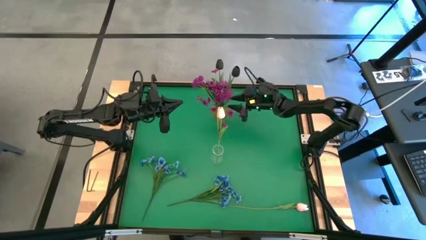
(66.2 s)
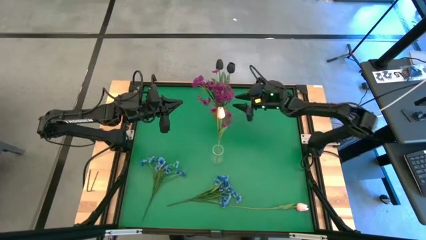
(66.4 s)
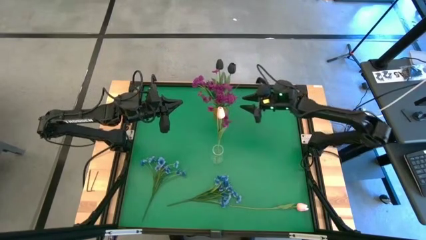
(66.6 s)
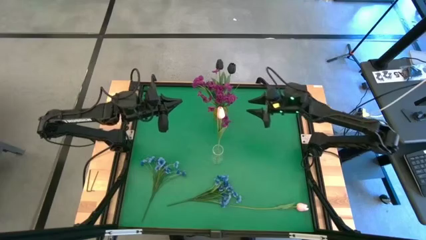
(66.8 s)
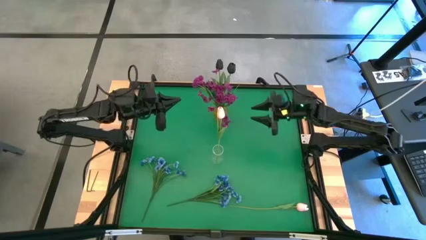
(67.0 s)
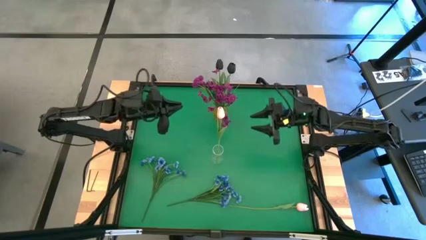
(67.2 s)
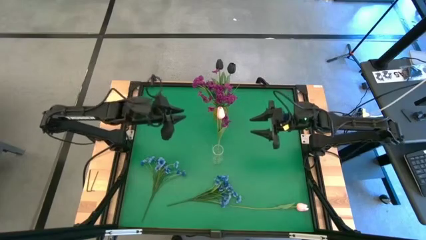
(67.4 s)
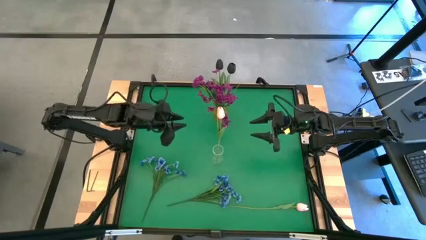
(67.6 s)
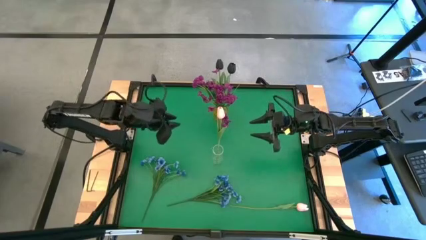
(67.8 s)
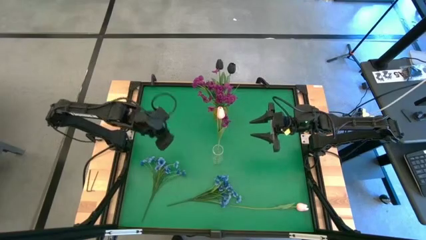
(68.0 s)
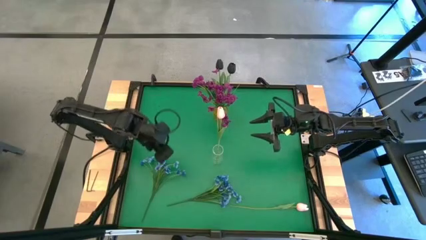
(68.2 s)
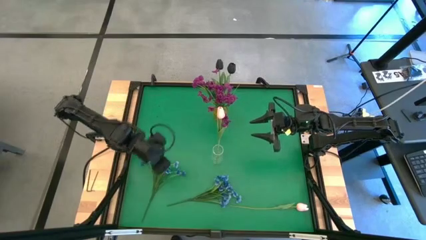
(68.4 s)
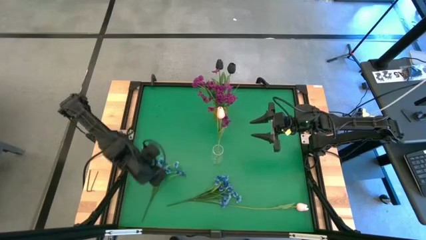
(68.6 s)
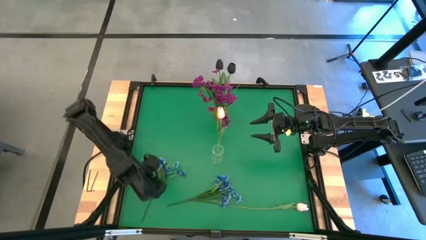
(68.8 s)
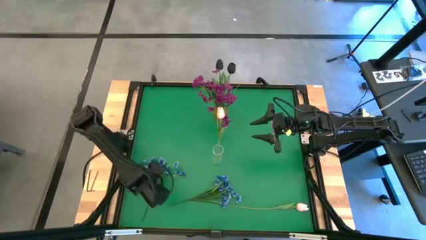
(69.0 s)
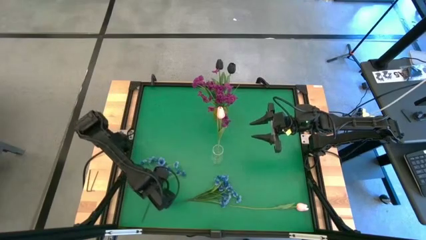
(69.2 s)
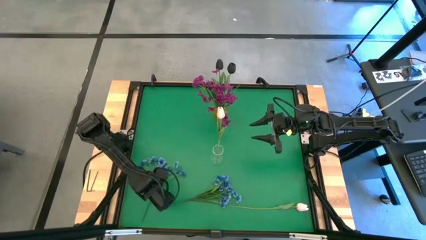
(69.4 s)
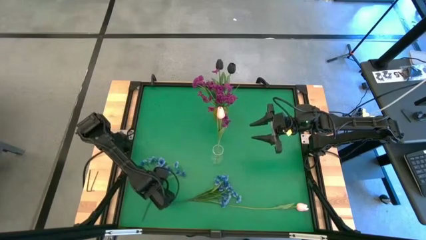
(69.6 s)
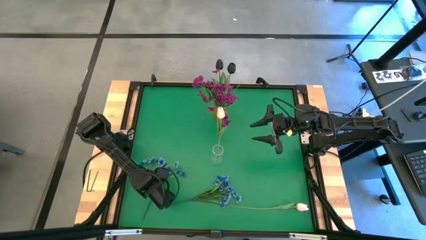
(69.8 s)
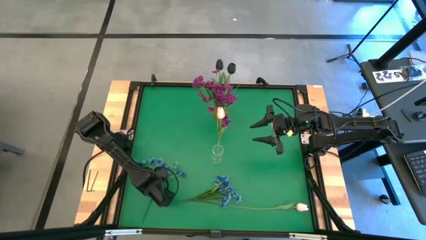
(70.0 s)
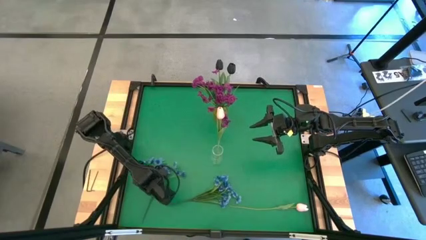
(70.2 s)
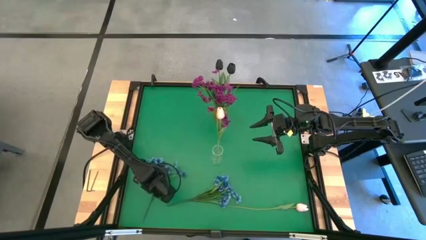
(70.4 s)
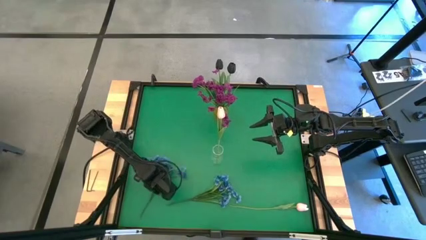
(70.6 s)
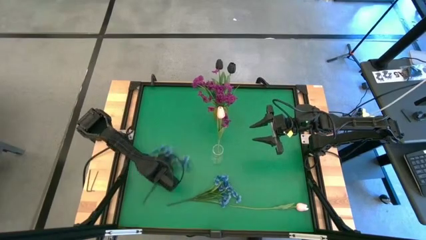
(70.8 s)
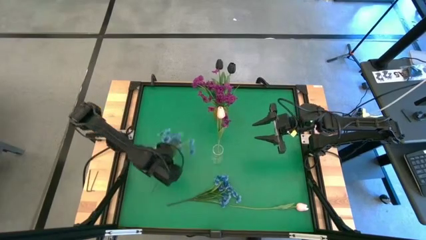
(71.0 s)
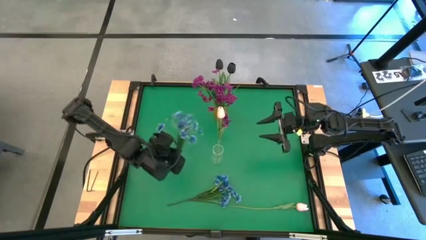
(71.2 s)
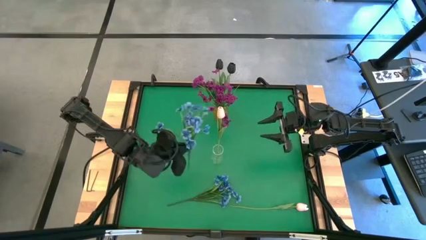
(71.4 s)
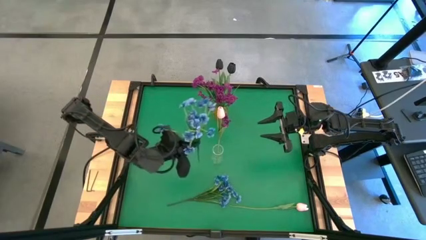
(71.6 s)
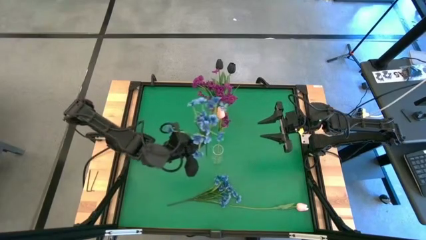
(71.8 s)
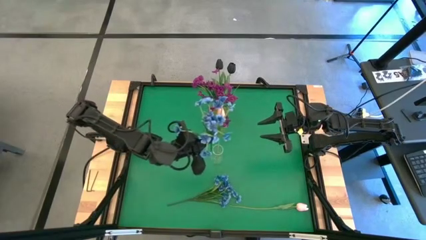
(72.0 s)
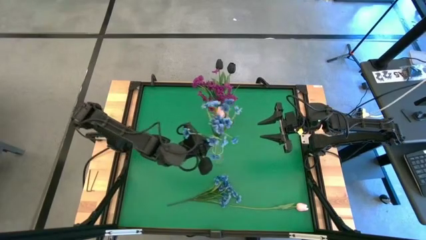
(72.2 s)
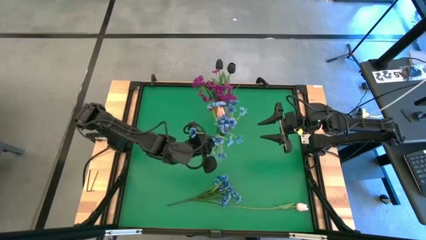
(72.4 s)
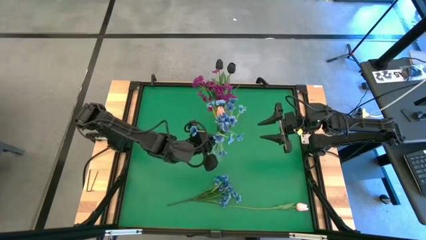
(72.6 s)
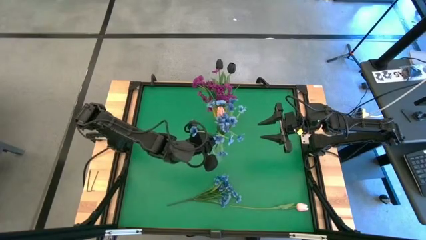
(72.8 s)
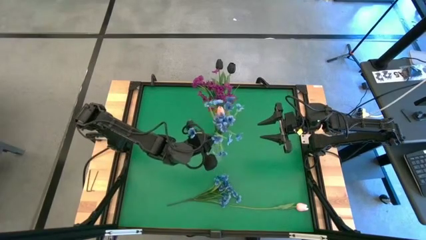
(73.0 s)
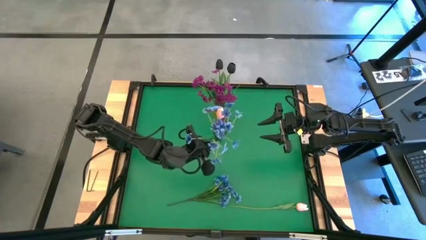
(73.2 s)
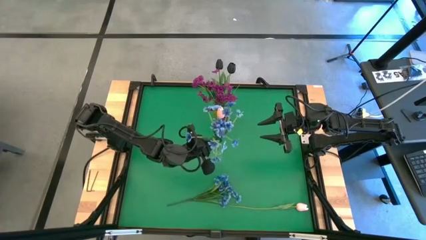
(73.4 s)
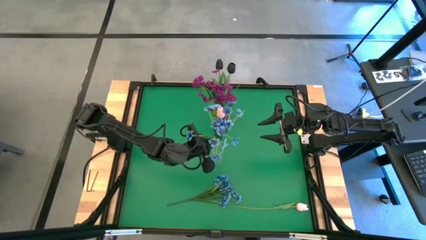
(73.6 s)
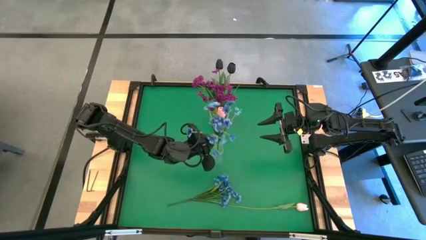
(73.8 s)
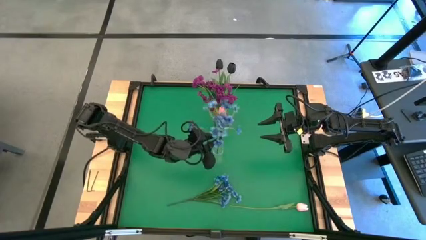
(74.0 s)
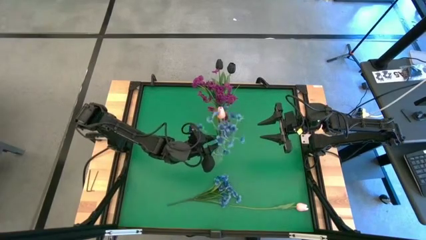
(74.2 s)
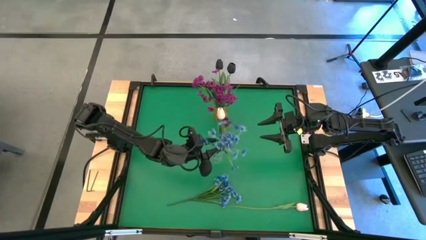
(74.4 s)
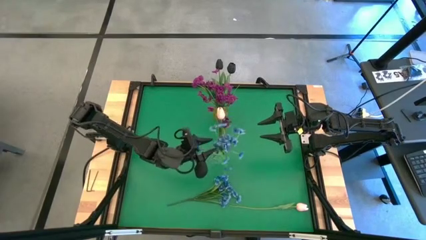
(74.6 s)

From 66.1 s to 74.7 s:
Task: Sort flowers into vase by color
Put the left blue flowers into the transparent vase

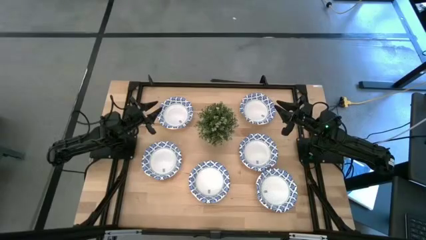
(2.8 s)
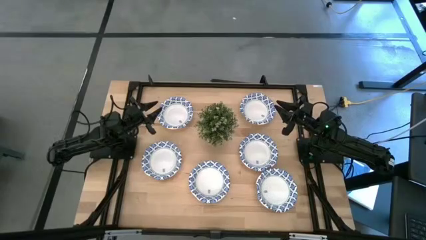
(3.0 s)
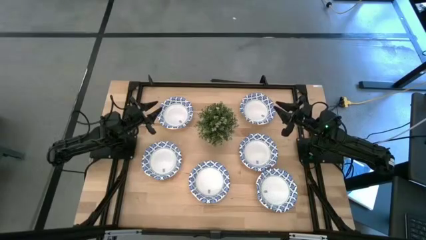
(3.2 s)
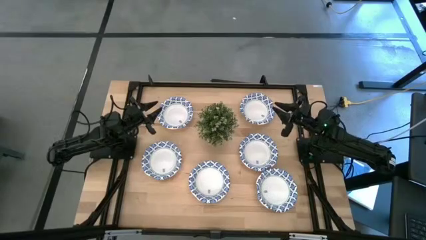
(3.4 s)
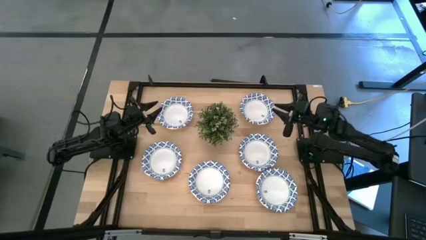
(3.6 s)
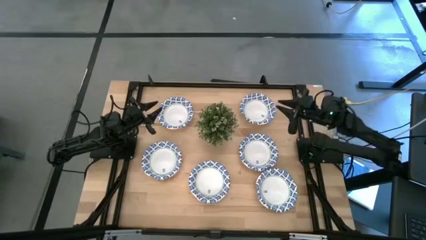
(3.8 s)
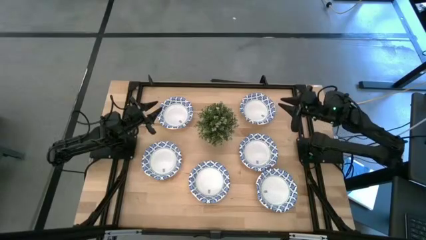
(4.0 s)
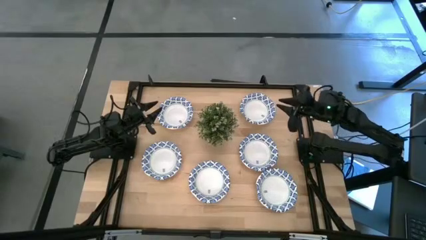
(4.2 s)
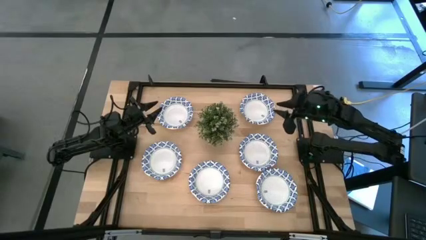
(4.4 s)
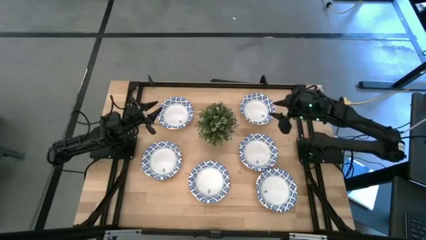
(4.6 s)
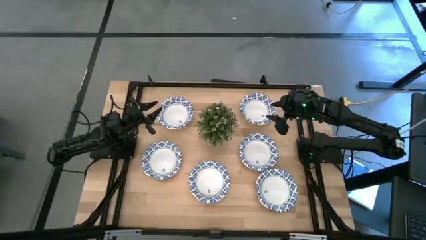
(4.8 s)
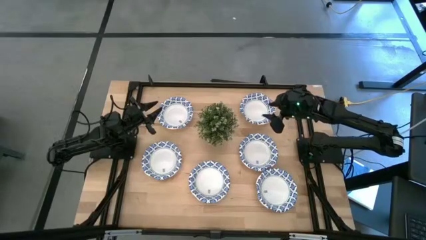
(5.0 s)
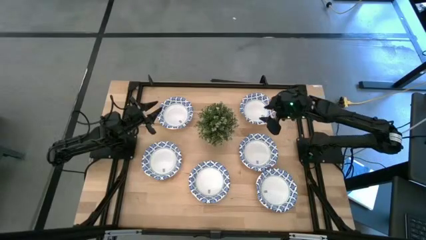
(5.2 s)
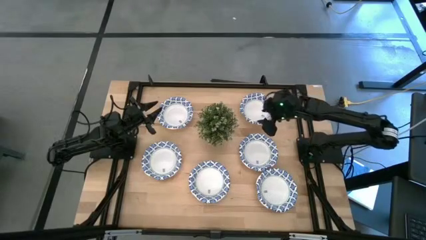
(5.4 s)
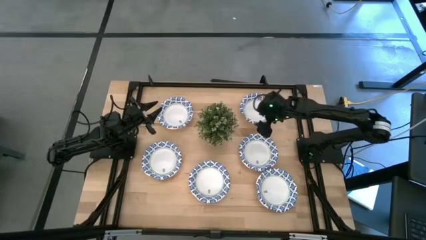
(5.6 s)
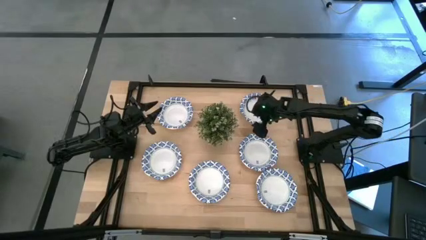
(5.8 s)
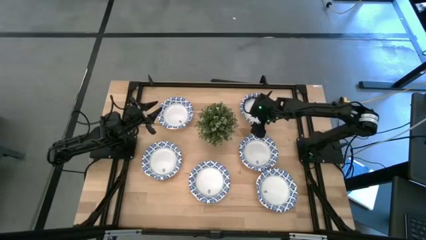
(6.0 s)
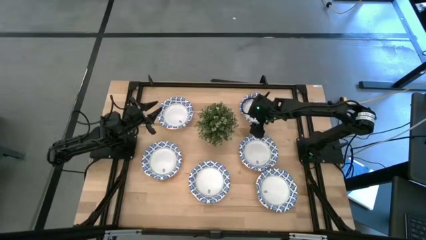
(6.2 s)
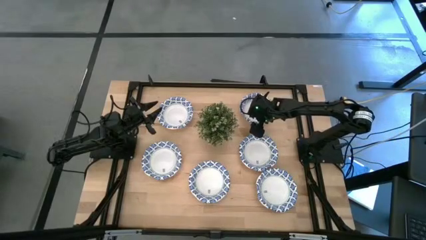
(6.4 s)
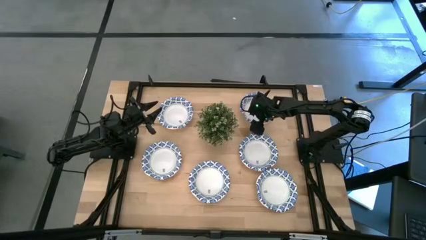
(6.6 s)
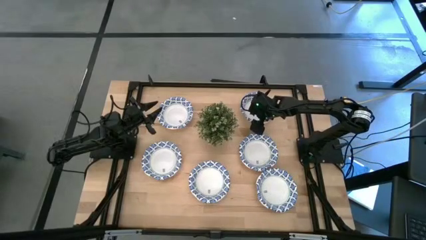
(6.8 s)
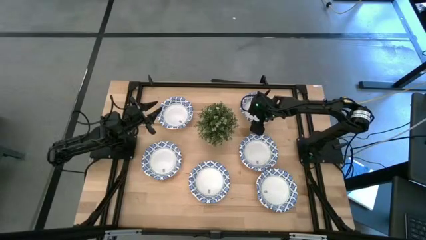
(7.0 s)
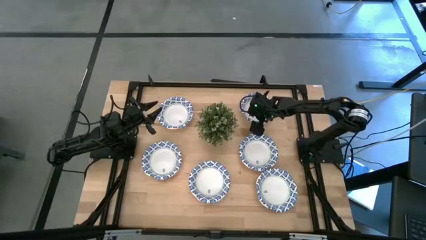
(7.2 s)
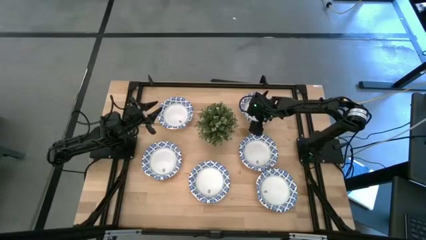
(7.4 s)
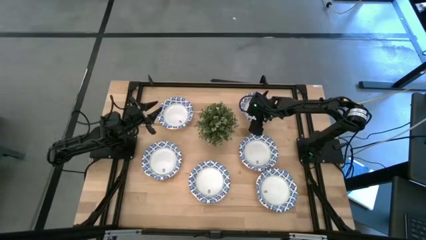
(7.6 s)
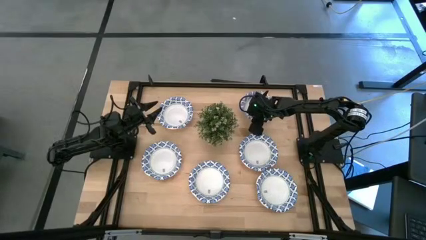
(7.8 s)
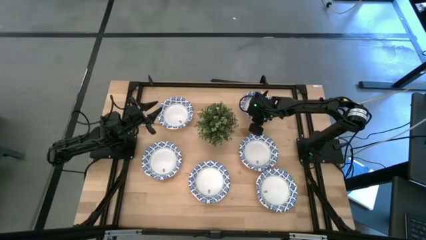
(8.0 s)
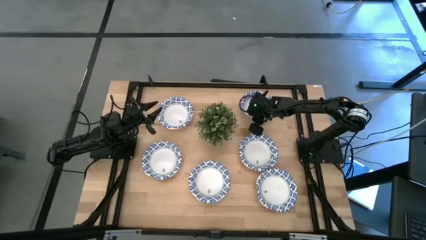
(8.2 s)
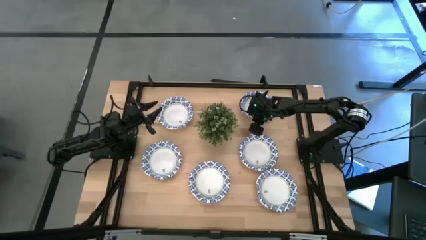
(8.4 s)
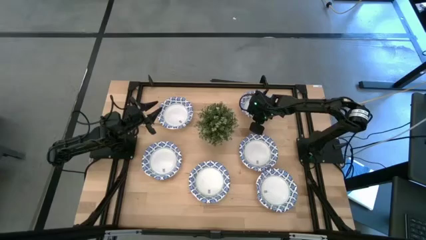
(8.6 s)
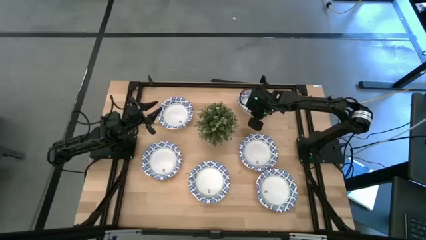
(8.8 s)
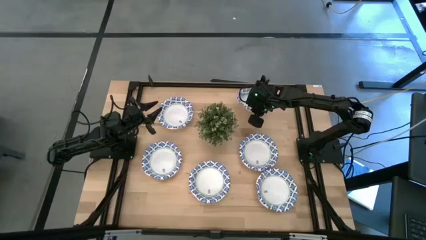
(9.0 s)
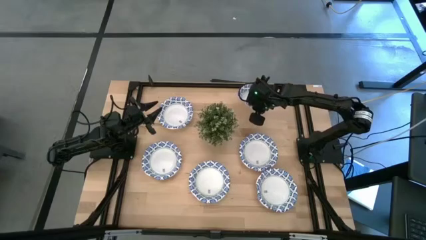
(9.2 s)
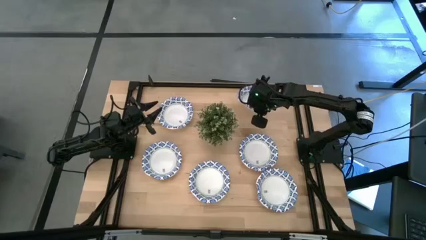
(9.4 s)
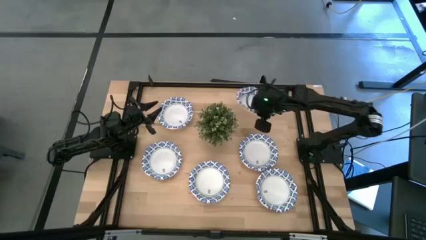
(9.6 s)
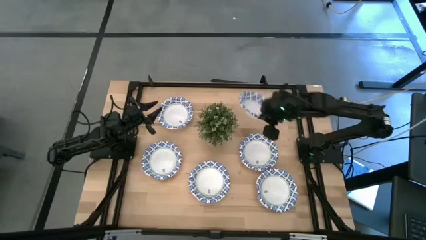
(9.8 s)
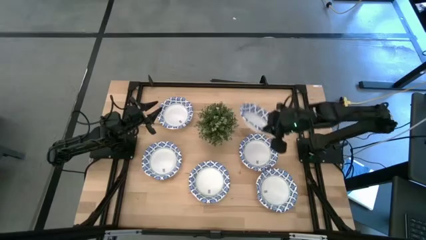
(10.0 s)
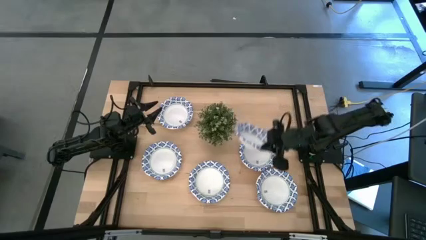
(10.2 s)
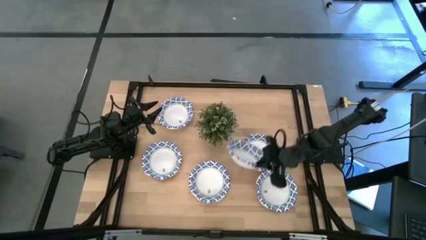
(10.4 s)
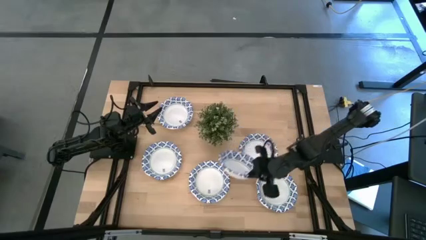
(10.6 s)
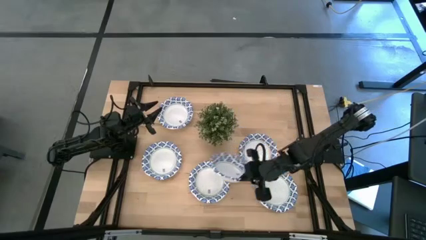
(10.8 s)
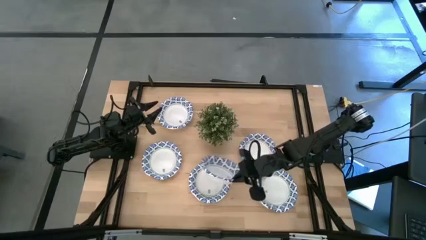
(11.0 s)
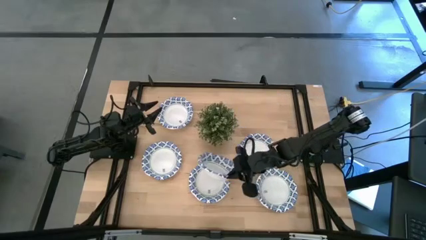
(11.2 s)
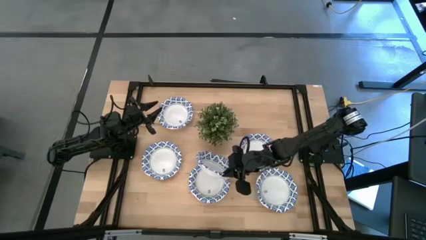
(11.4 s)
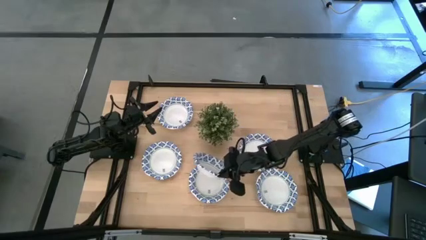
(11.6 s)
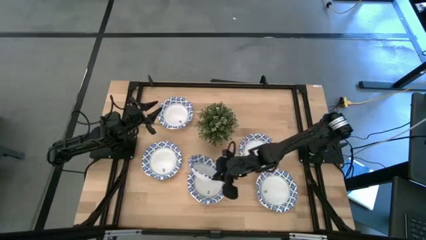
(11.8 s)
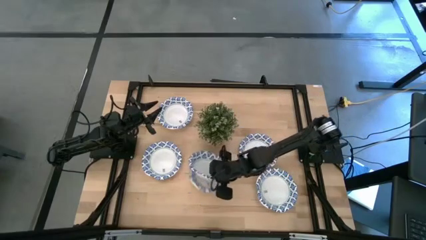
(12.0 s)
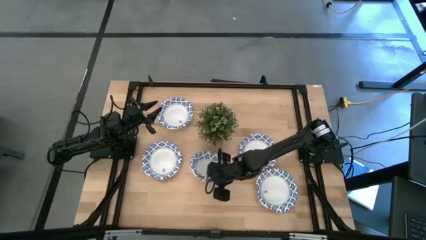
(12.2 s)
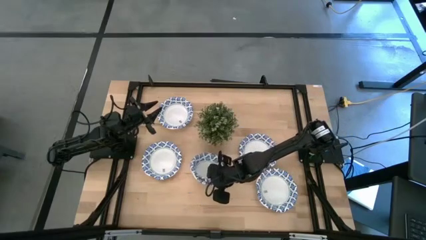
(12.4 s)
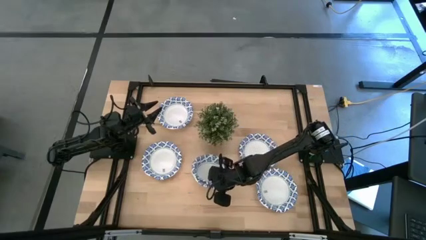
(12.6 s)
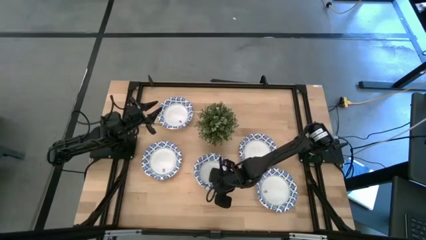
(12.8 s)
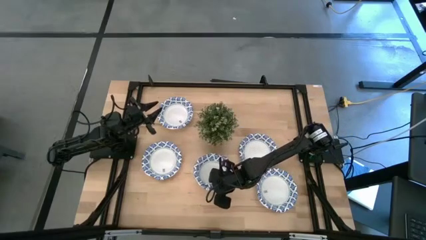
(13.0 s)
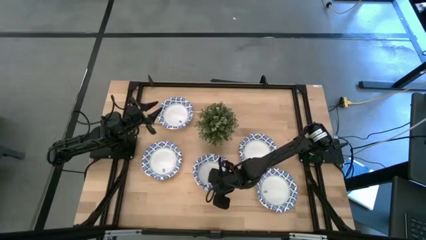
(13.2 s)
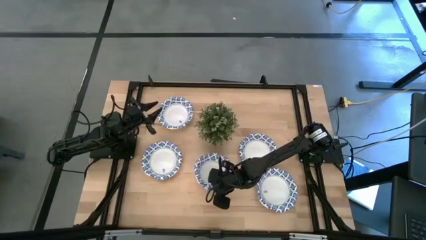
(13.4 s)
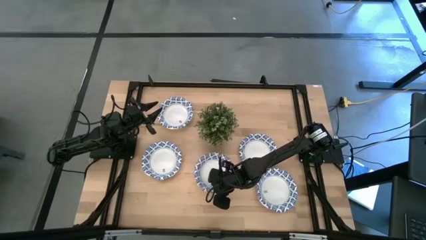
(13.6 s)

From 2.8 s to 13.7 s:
Task: Nest bowls inside each other
Stack the white bowl on top of the other white bowl
